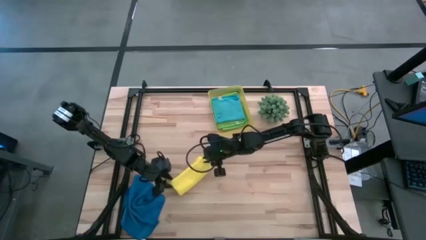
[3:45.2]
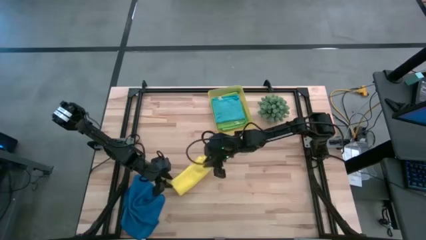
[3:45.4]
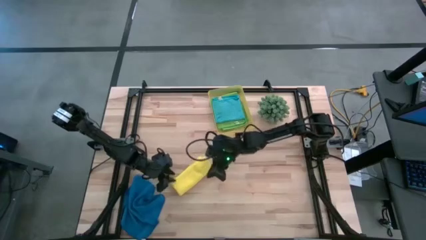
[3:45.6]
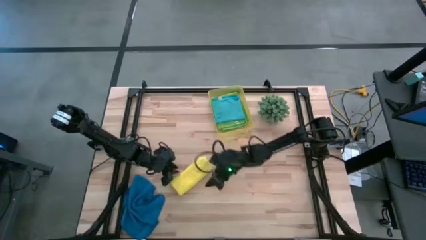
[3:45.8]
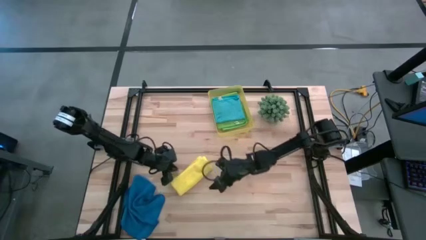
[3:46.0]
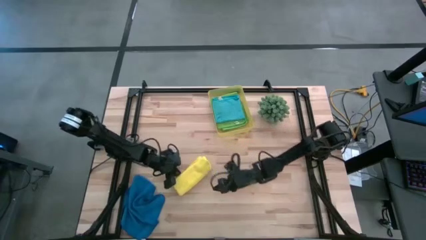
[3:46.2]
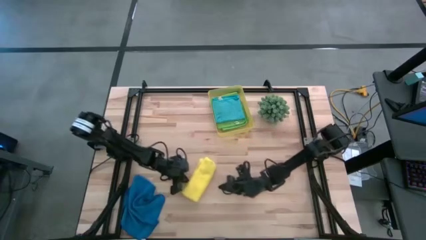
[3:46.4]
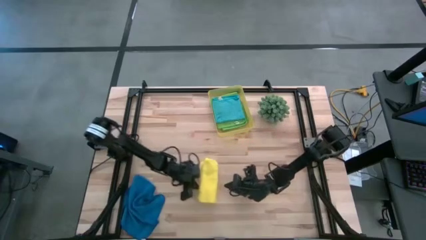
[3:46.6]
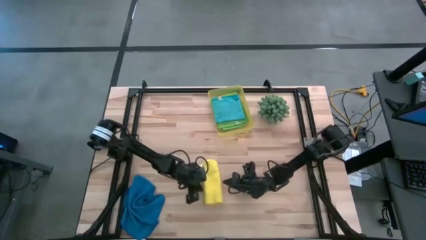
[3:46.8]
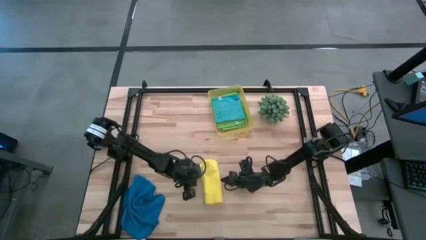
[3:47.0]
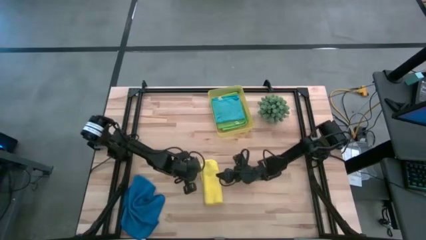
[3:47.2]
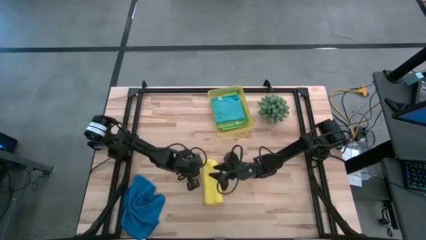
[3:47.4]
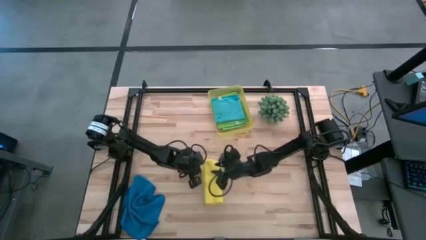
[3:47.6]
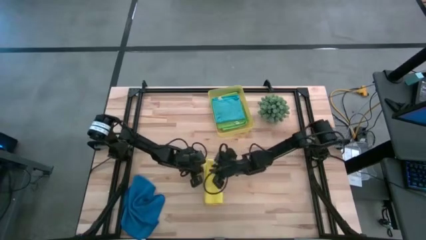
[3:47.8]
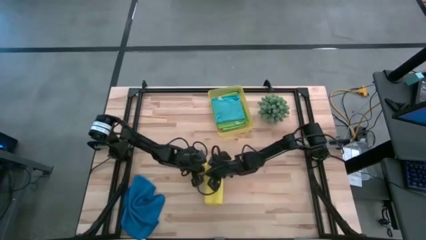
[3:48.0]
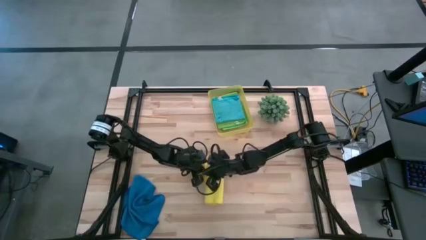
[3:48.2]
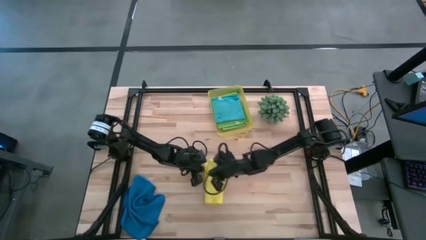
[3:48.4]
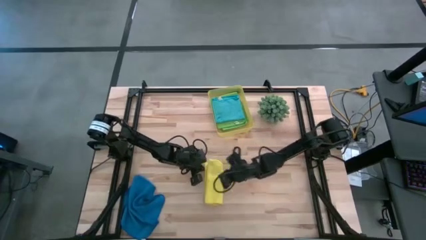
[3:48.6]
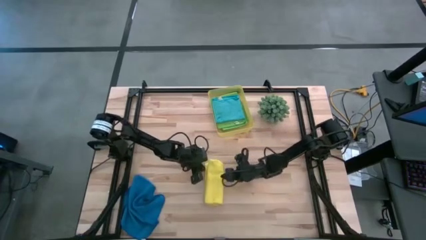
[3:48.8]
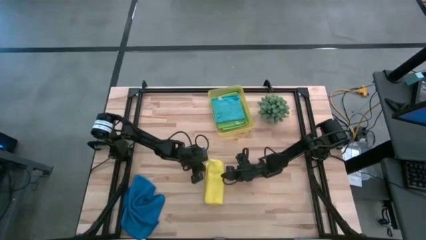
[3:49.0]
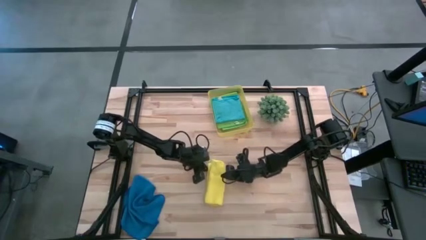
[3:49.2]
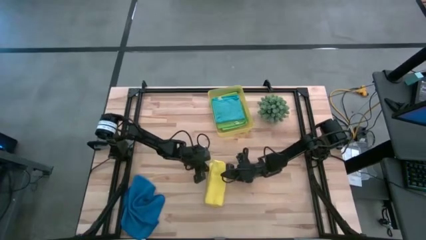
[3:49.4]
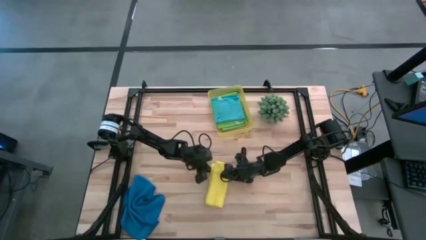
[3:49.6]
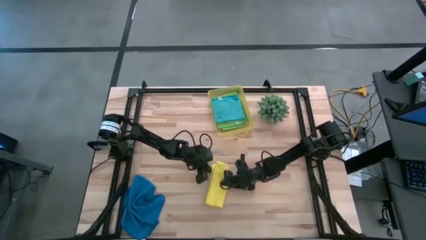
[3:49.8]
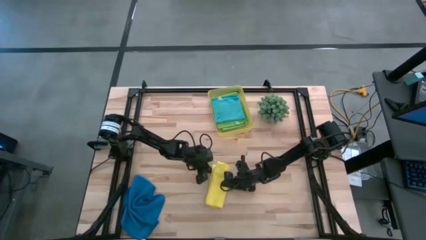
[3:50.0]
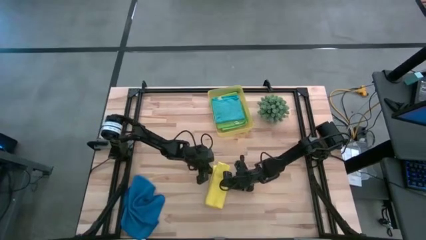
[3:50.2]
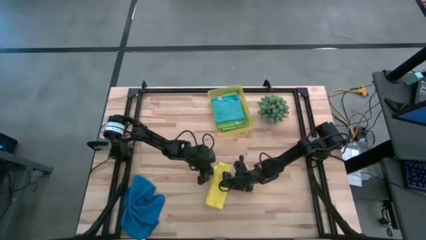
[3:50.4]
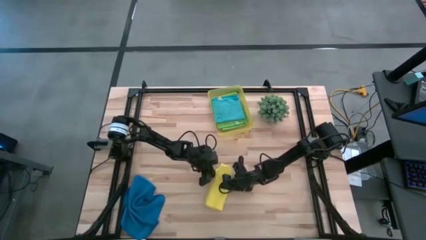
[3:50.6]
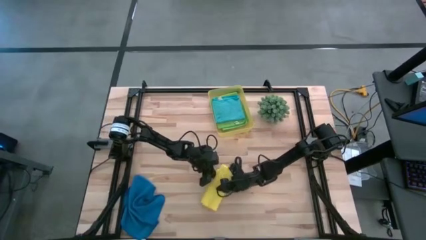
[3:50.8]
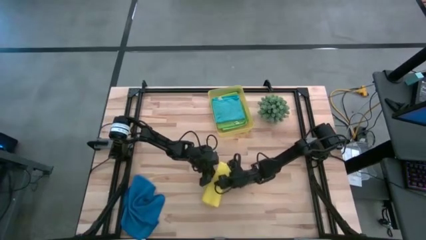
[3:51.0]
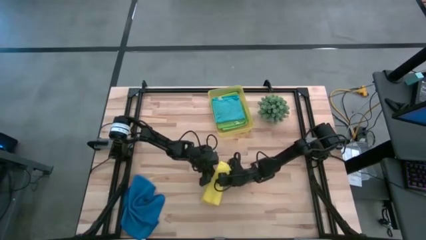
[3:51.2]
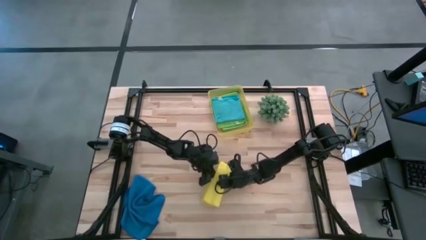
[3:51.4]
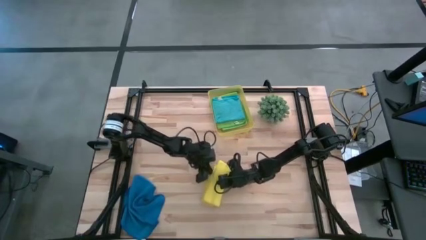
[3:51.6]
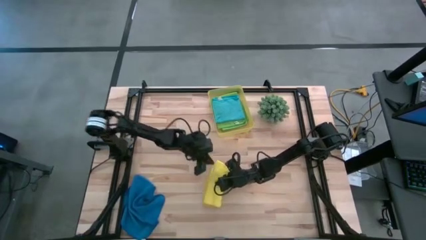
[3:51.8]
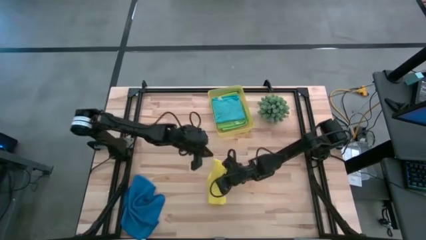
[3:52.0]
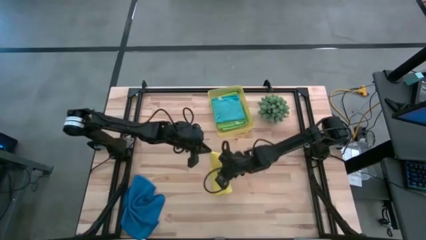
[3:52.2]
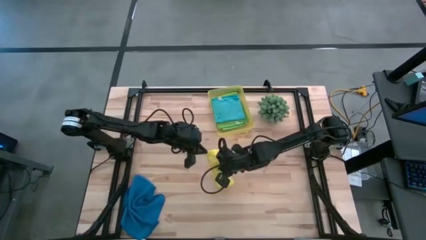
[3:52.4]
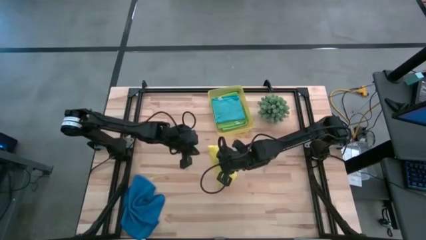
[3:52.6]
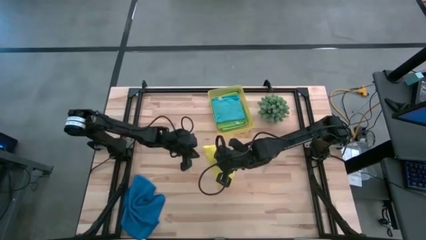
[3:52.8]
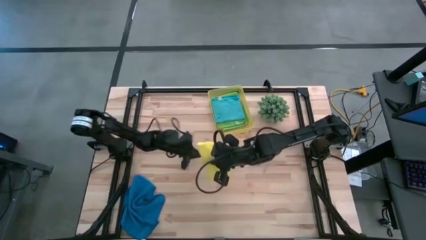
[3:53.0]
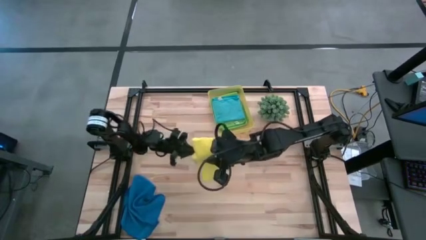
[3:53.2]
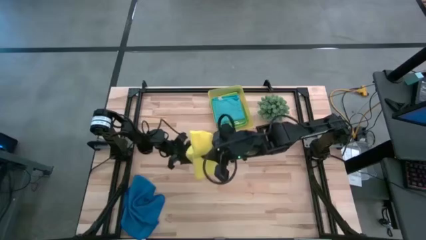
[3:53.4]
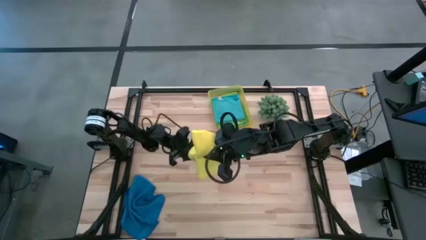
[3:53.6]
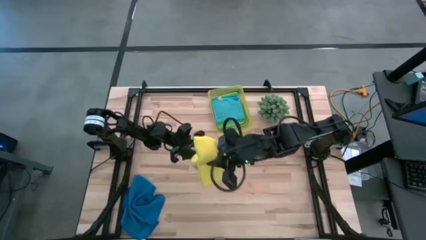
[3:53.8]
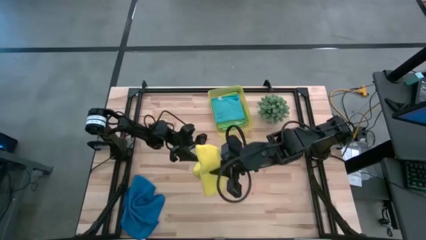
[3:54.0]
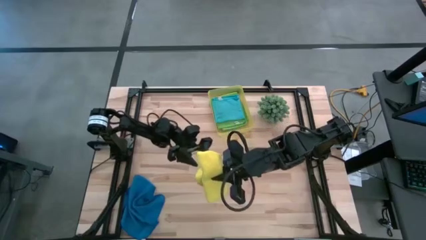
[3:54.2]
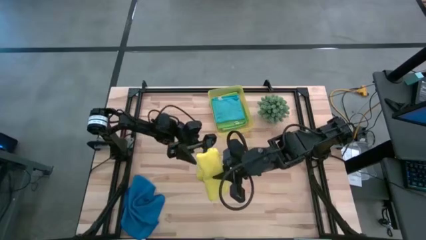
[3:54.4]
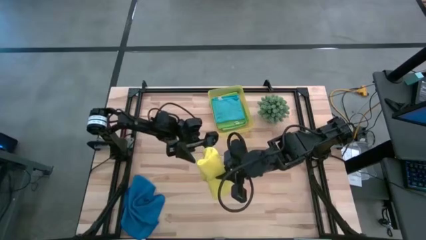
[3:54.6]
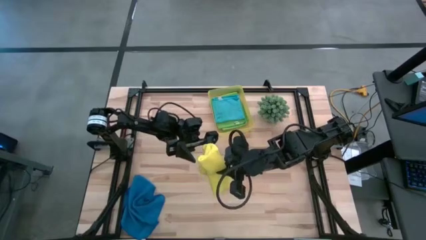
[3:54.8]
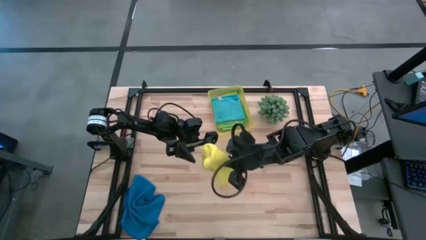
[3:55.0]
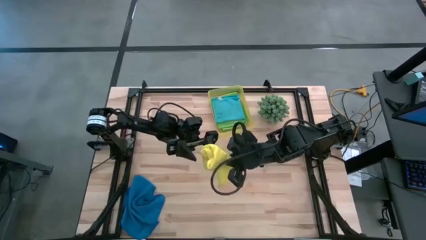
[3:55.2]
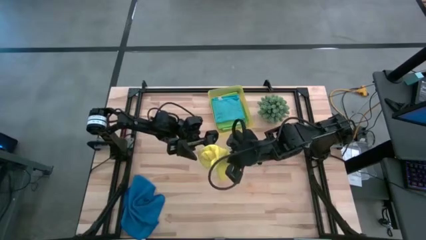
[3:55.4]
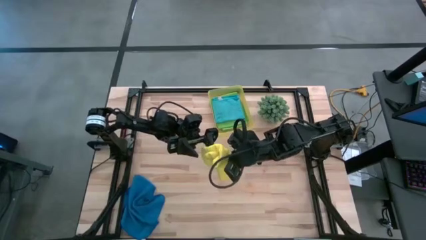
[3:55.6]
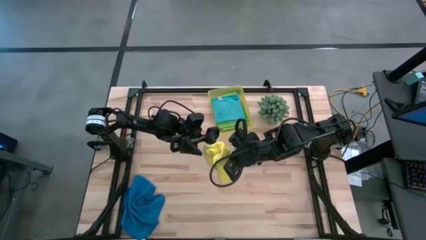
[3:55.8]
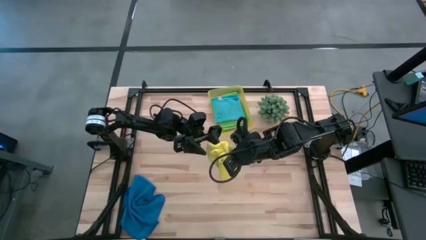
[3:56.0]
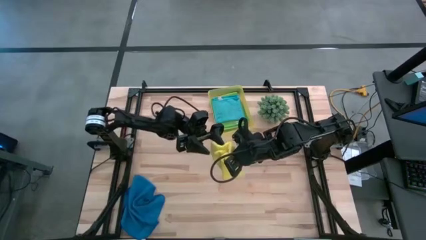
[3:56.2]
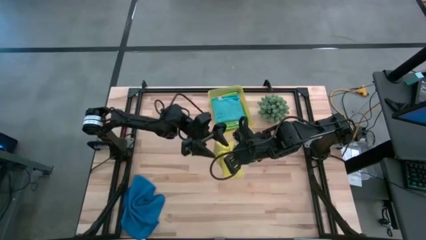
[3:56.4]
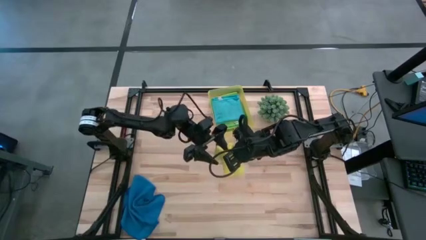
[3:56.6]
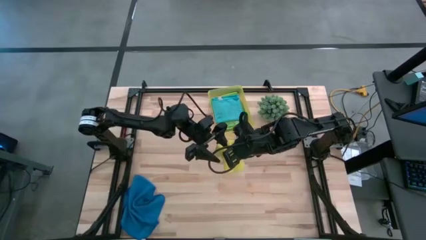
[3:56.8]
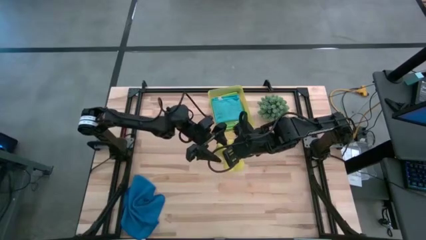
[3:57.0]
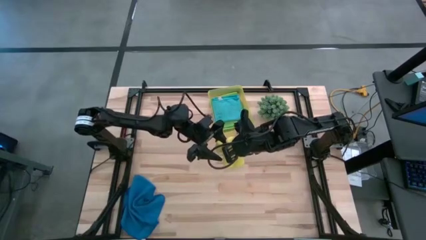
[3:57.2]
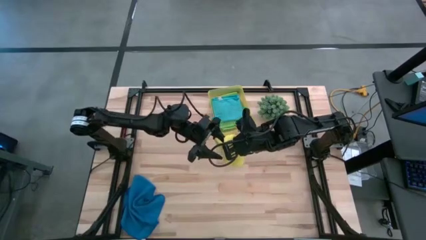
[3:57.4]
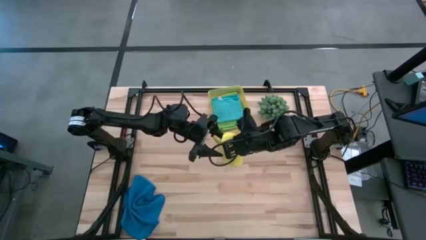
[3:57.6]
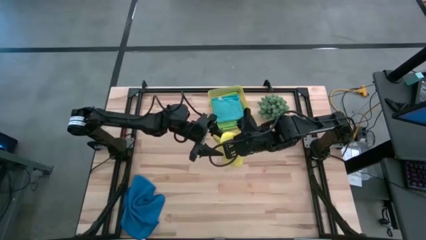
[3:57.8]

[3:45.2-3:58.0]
Task: Fold microfiber towels
Put the yellow microfiber cloth into the yellow bin

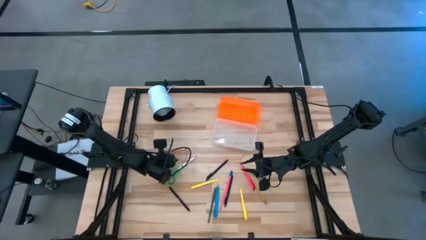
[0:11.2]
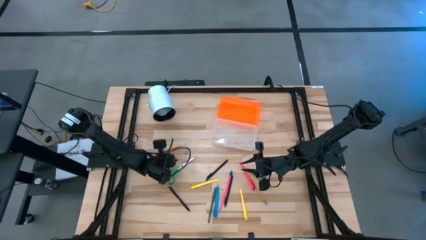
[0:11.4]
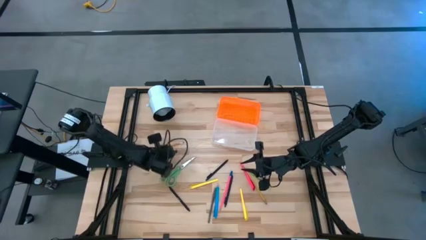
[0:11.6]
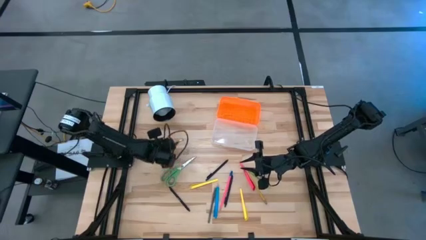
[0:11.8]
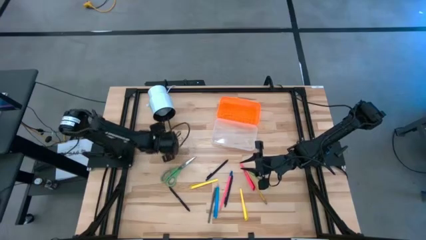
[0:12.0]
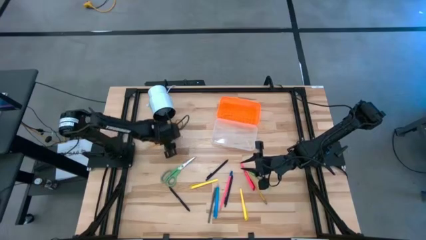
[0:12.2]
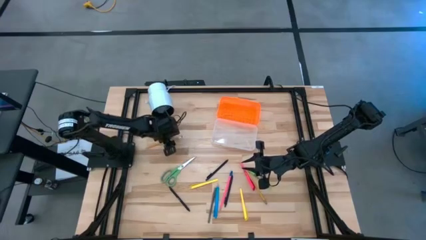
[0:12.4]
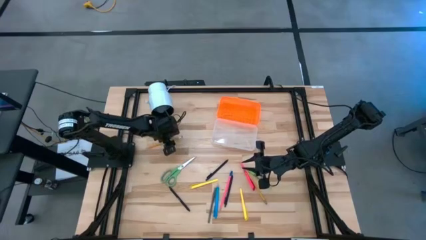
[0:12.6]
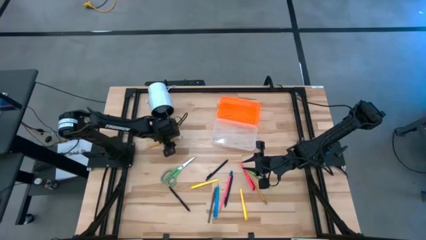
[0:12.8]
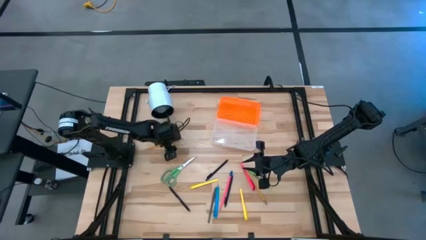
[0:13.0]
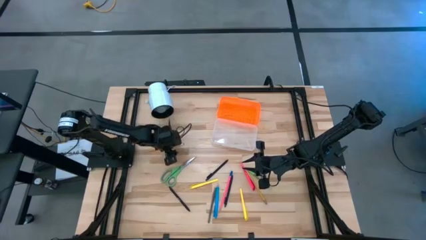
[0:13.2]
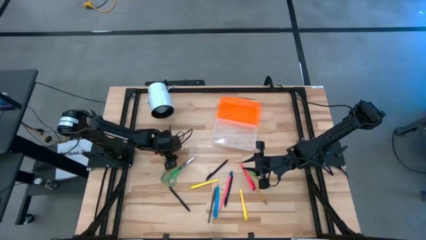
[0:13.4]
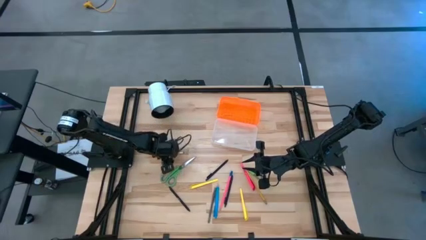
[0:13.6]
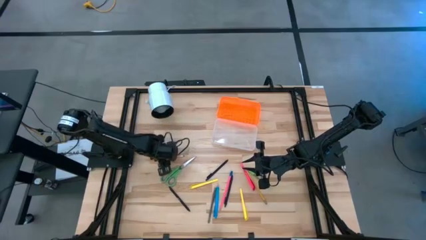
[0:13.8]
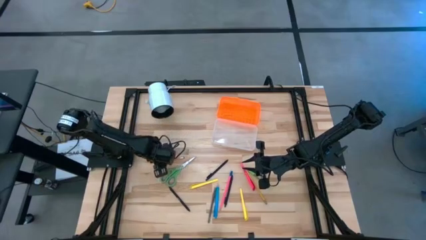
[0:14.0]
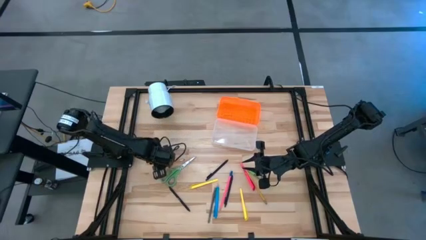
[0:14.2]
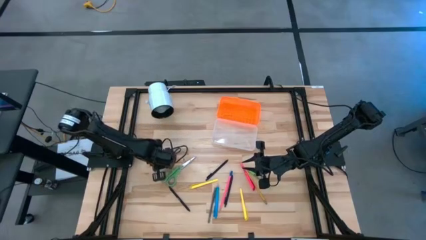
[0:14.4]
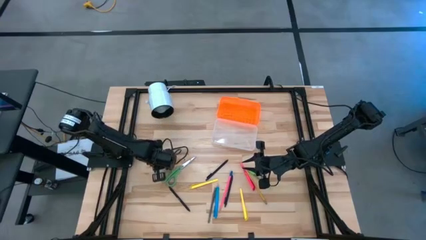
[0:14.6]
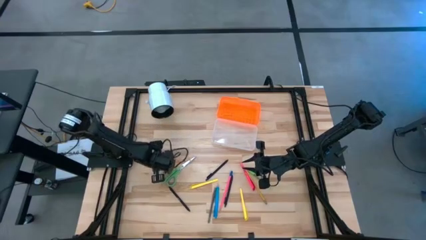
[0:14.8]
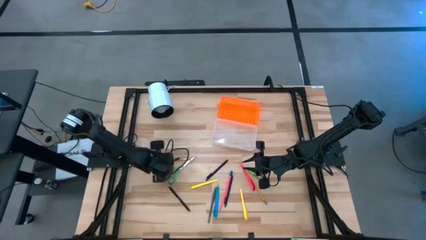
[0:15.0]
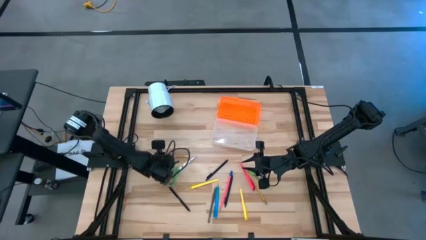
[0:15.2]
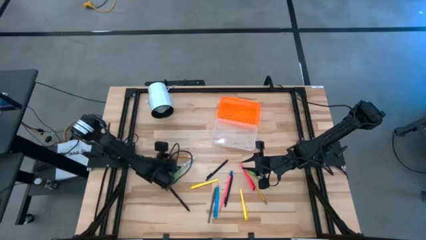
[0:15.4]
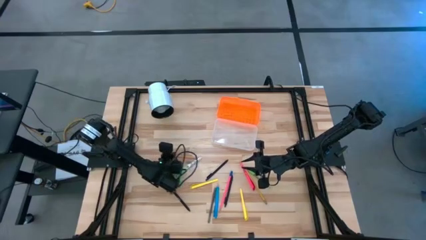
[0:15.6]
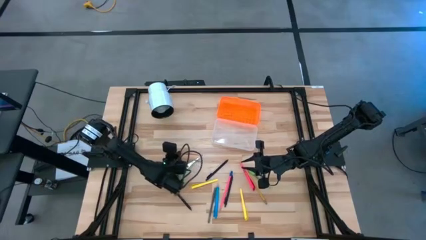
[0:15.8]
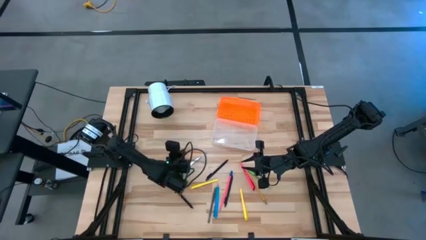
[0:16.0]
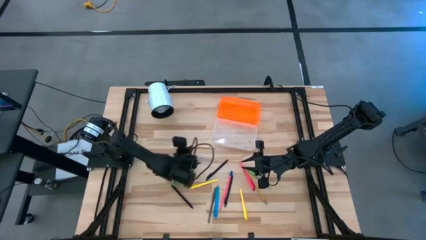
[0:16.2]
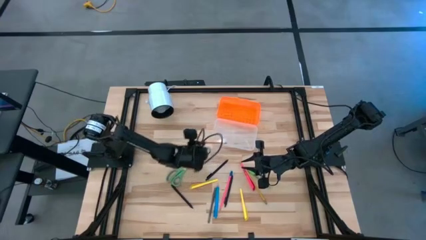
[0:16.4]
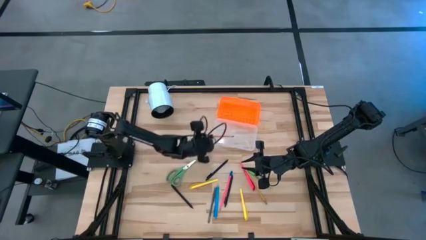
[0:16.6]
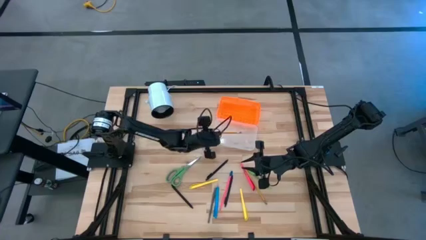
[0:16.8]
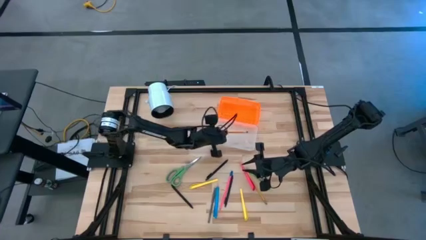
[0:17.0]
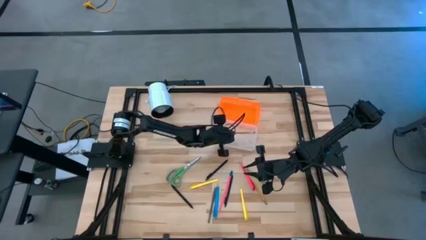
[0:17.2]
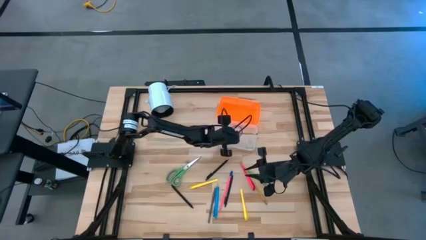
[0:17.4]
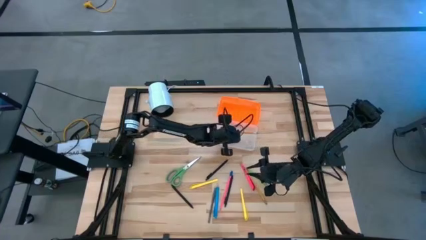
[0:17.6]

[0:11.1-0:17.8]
Task: Pick & place school supplies into a supply box
Put the orange pencil into the supply box
